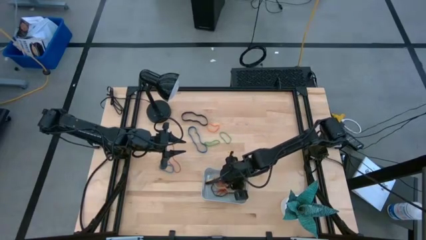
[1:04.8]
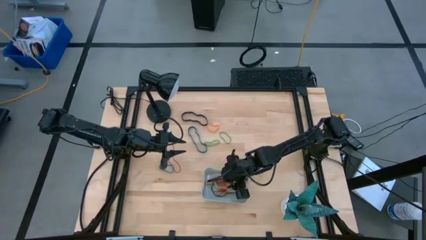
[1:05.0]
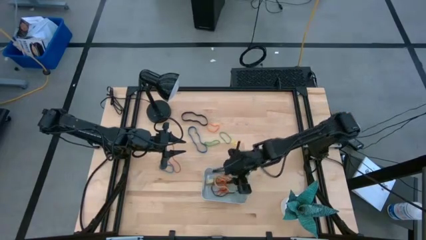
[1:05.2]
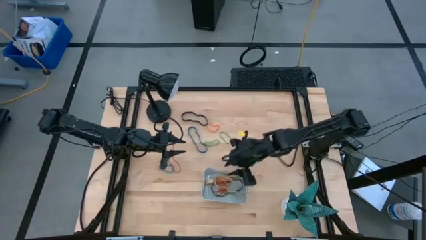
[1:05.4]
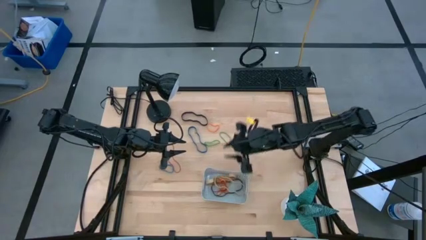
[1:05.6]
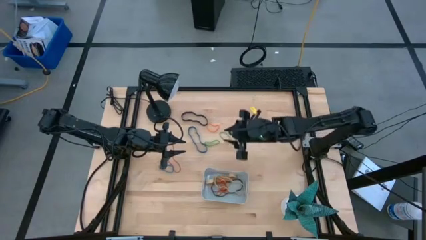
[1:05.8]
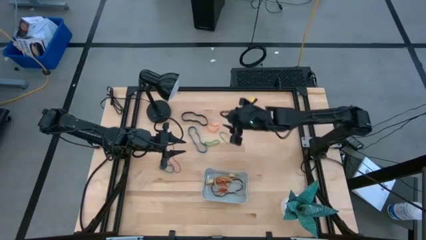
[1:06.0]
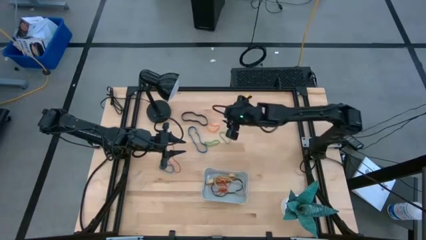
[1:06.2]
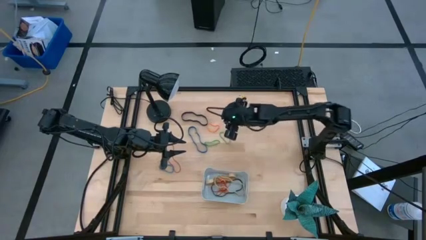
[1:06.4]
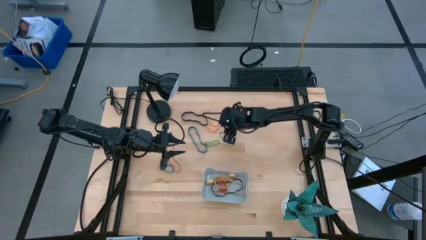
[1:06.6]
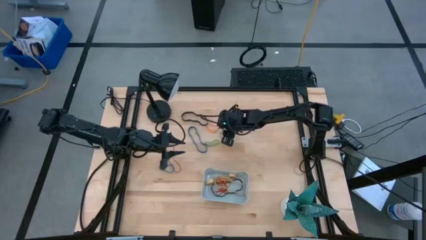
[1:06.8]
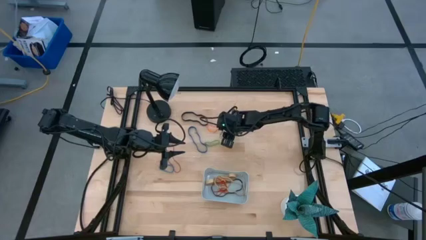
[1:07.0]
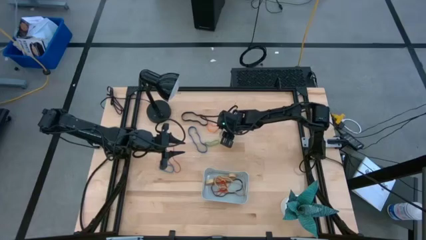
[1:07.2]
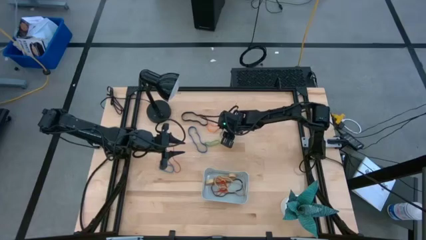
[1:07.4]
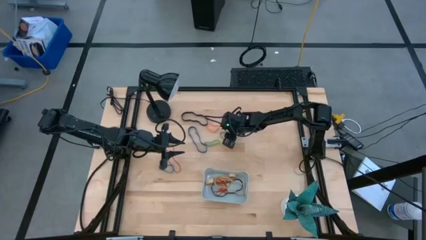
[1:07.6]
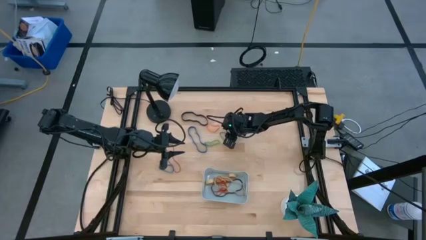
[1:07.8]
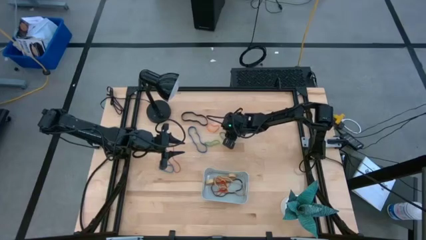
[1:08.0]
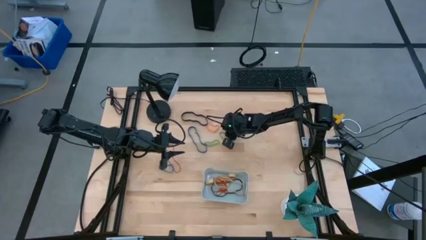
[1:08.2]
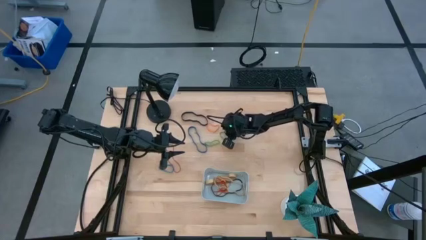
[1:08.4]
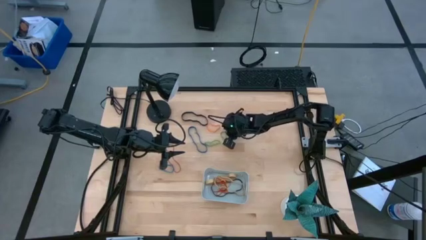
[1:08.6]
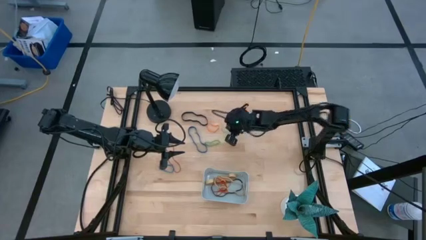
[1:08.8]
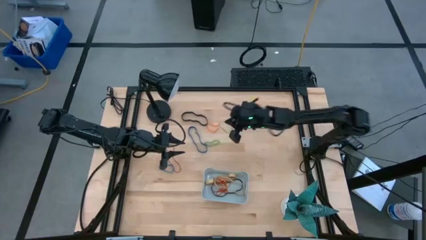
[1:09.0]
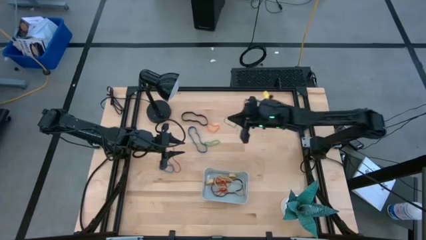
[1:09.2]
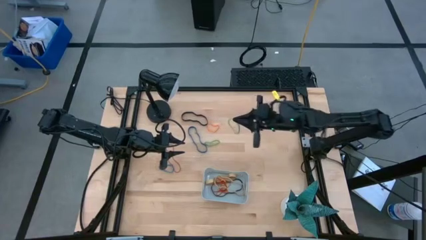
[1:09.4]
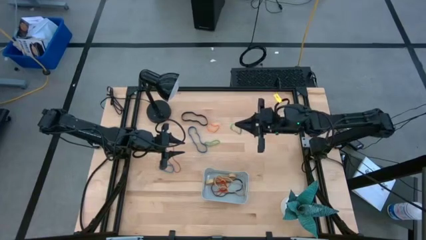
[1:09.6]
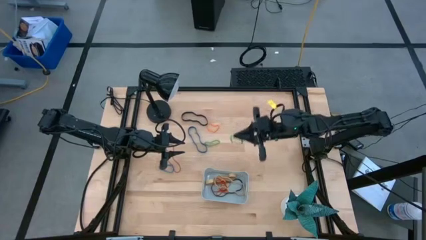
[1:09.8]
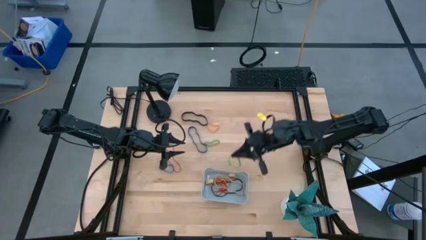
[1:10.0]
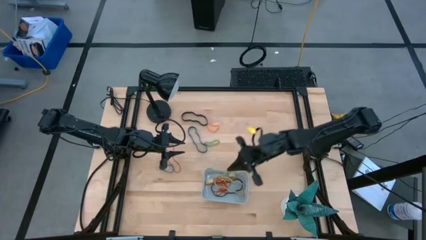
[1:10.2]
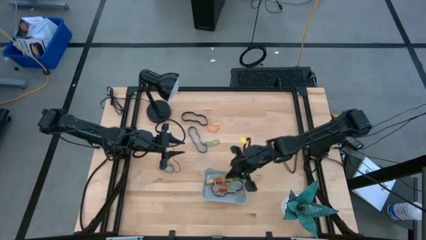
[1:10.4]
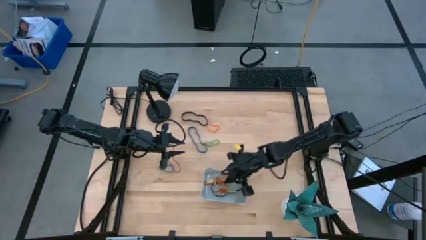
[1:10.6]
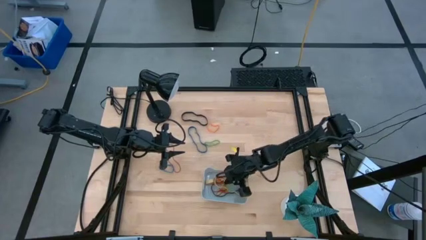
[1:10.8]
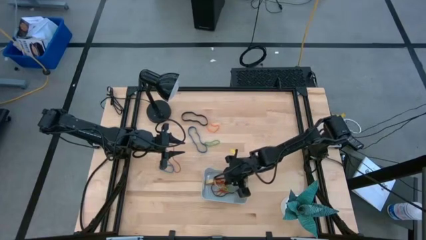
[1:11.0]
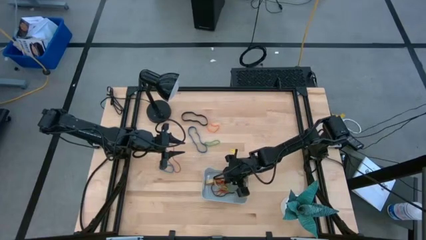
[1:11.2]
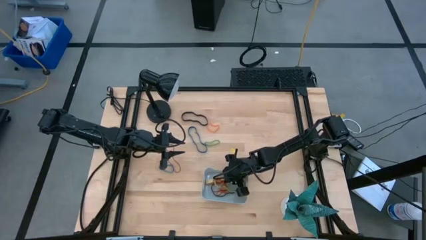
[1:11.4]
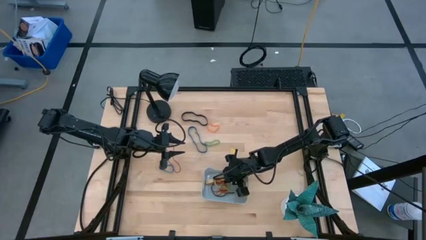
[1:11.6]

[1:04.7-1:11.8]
Task: Pick and place rubber bands into bin
Put the right green rubber band into the gray bin

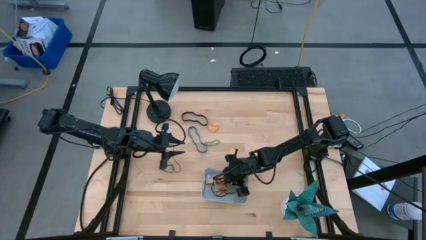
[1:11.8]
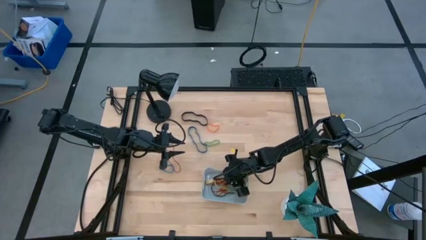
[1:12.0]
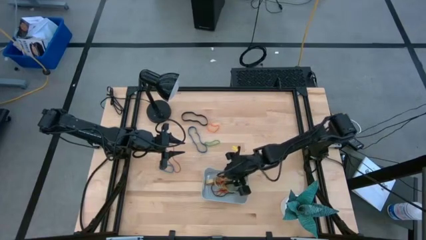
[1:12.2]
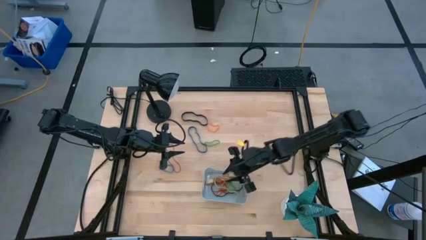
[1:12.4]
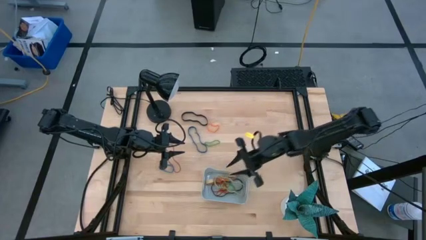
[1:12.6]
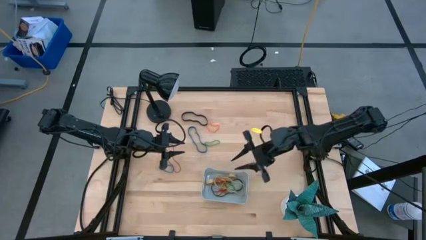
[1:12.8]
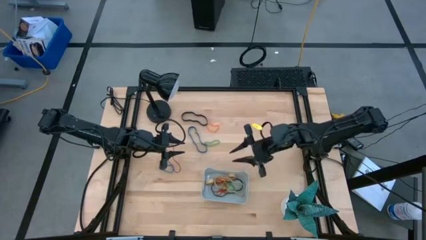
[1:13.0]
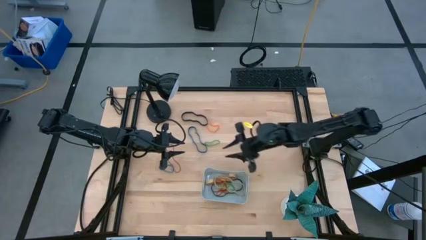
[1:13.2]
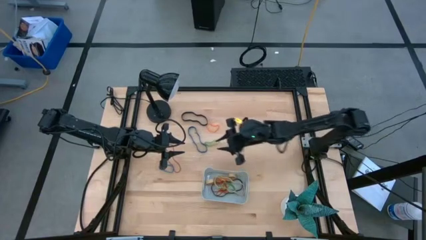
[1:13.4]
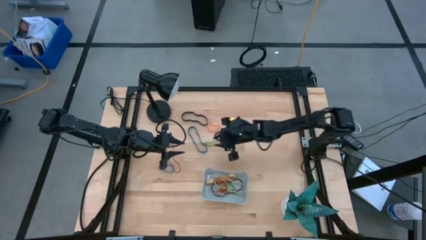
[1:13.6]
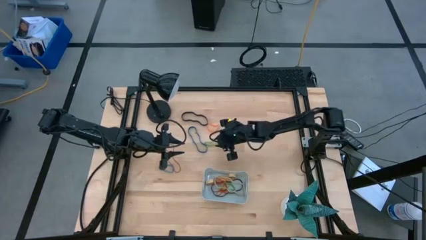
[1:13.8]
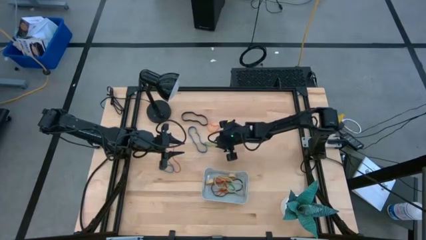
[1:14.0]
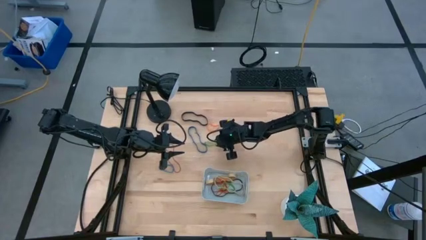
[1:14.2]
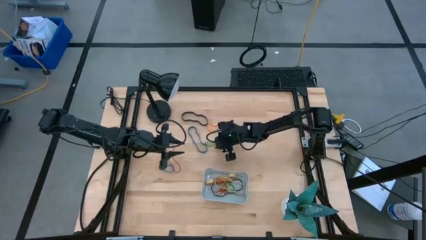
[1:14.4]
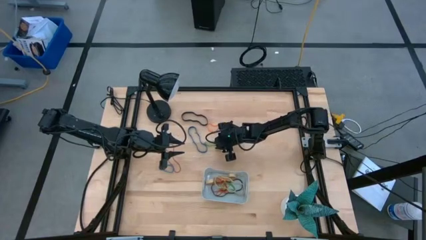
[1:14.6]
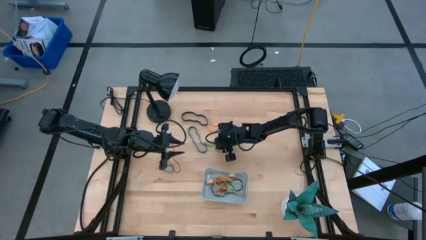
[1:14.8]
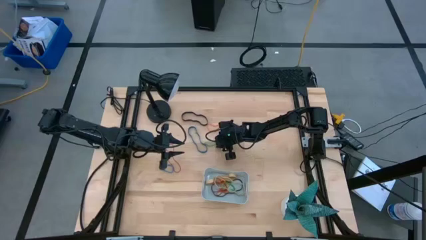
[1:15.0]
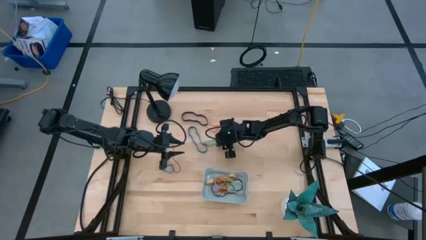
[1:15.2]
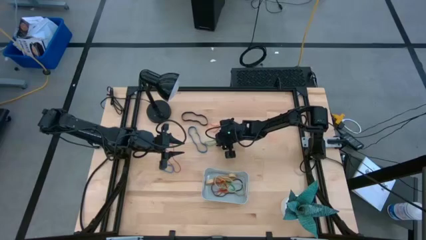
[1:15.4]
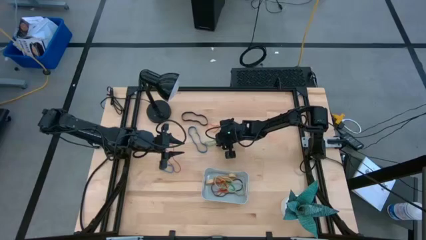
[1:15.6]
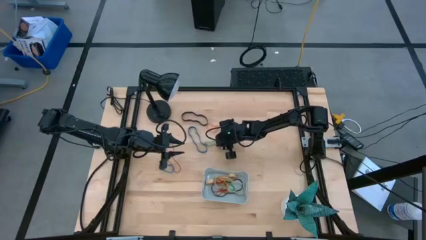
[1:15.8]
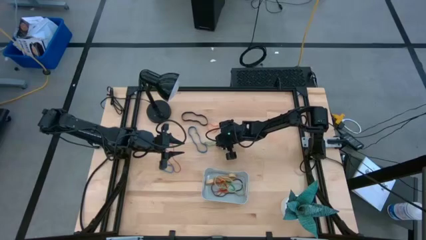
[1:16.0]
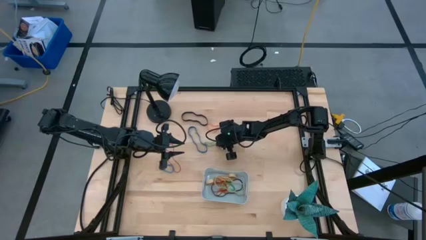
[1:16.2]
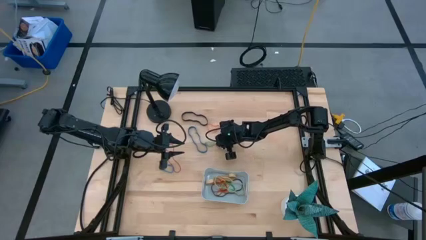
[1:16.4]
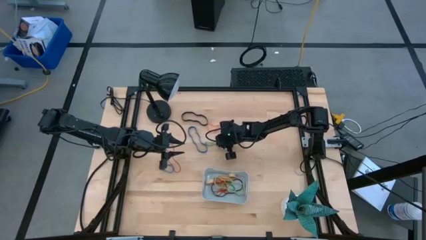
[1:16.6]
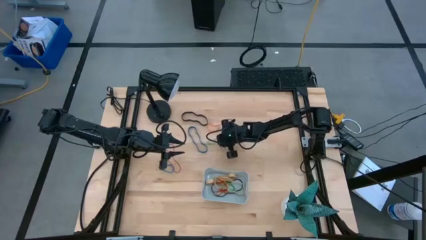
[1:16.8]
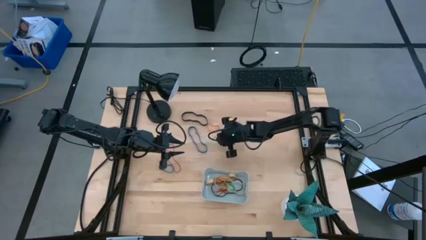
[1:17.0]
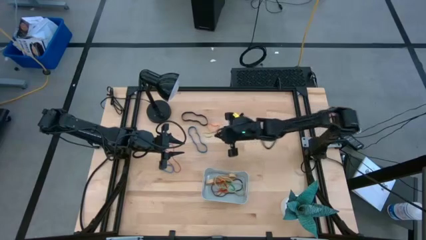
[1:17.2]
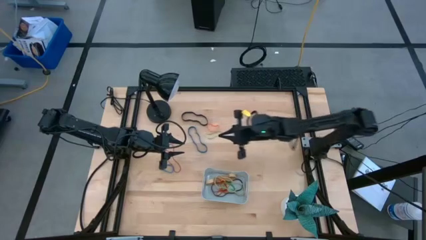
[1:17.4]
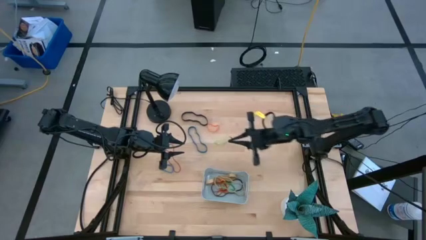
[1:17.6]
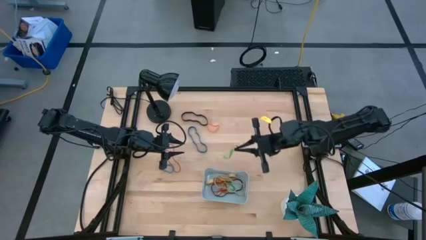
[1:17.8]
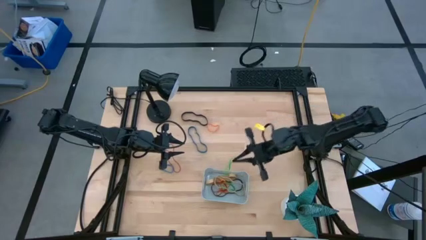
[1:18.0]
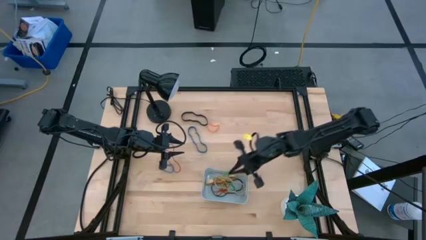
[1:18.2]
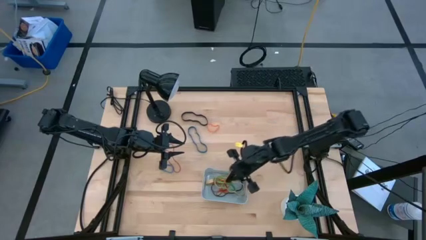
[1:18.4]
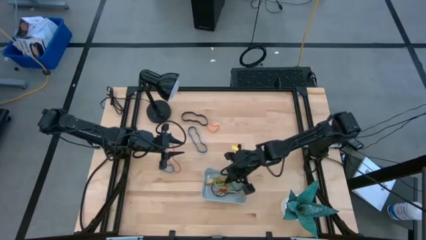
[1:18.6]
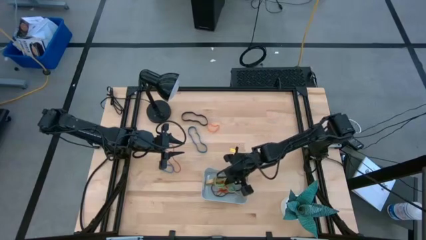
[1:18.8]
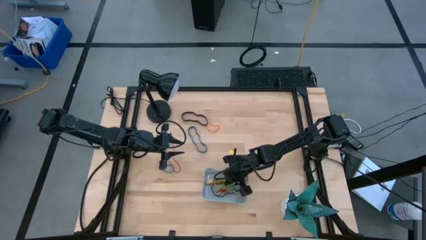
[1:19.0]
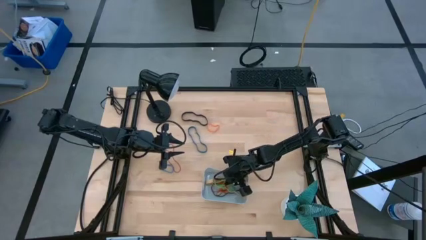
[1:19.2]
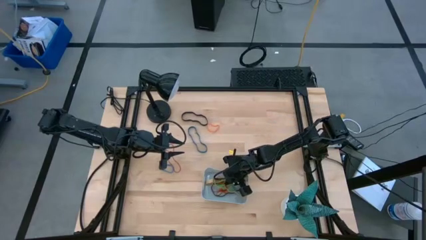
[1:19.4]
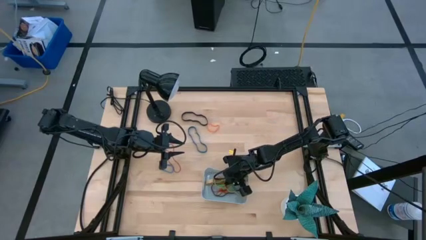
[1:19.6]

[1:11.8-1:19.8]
Put the green rubber band into the gray bin

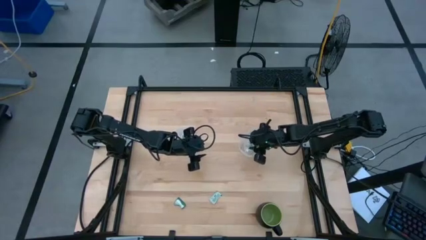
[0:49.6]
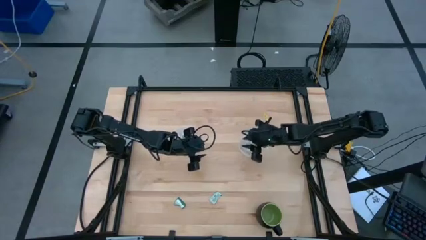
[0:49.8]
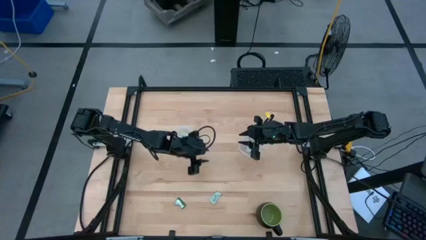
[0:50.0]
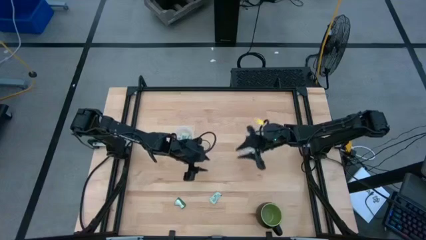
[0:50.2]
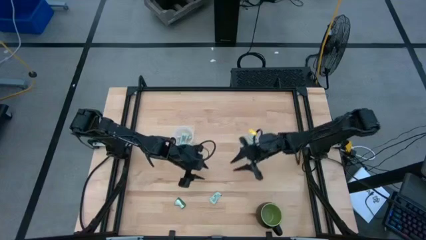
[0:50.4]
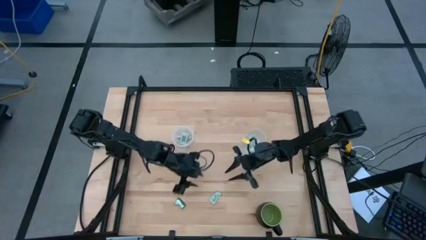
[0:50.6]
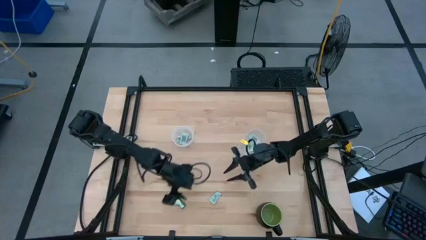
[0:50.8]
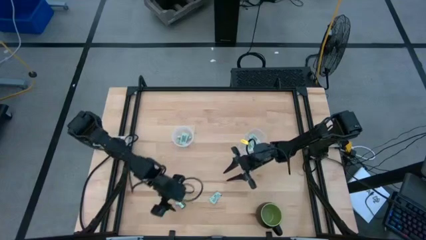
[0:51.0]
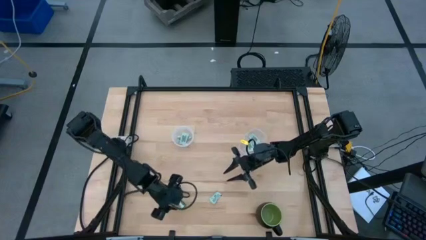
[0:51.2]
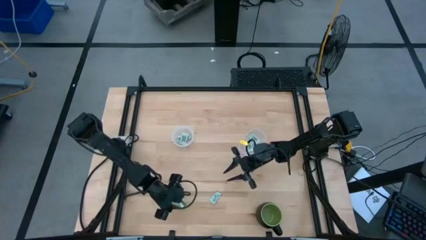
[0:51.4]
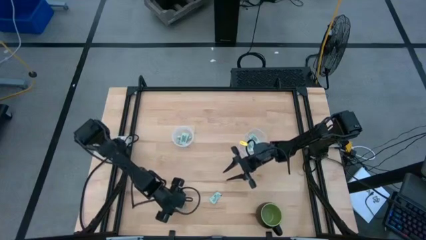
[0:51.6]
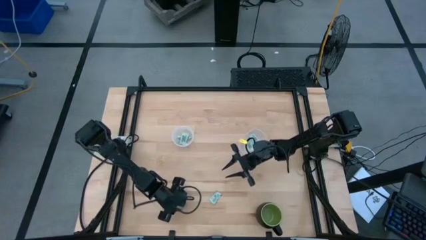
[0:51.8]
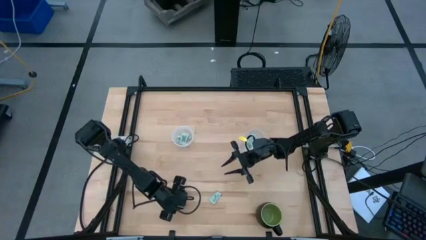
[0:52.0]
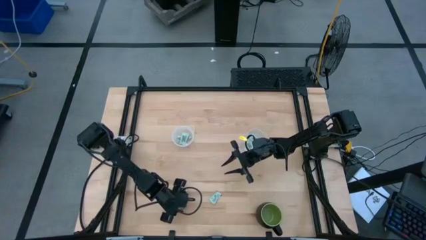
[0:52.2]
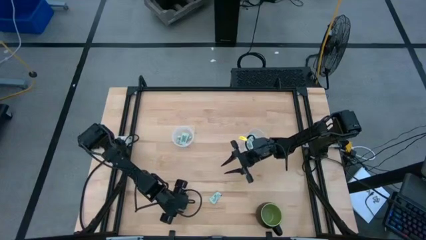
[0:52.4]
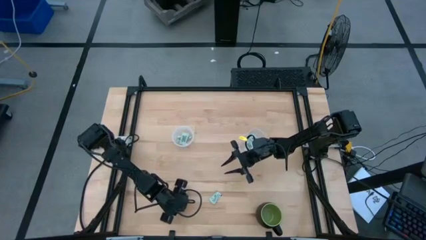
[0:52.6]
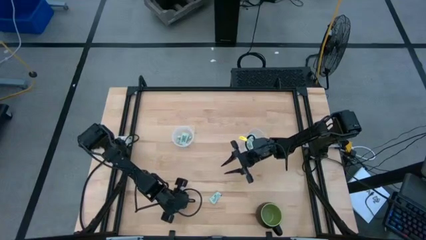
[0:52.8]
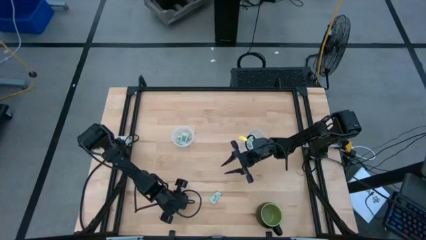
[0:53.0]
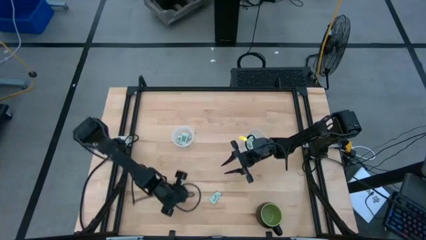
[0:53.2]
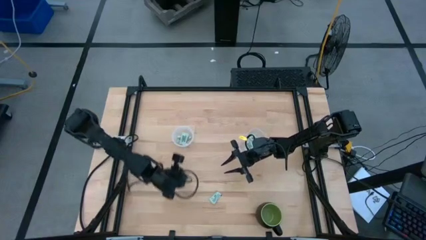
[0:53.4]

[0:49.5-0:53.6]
Task: Pick and place Stevia / Truvia into bins
Put the green stevia packet into the left transparent container
